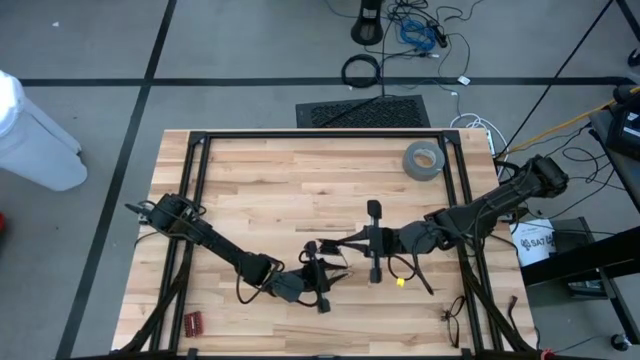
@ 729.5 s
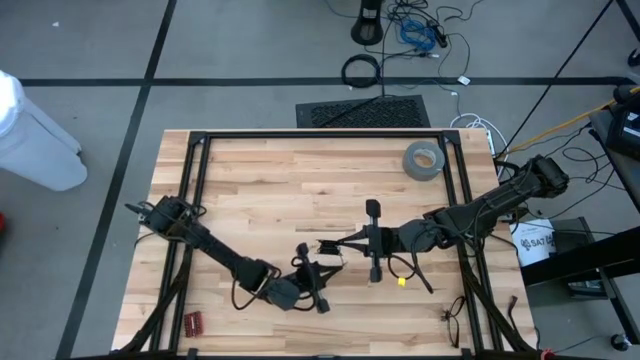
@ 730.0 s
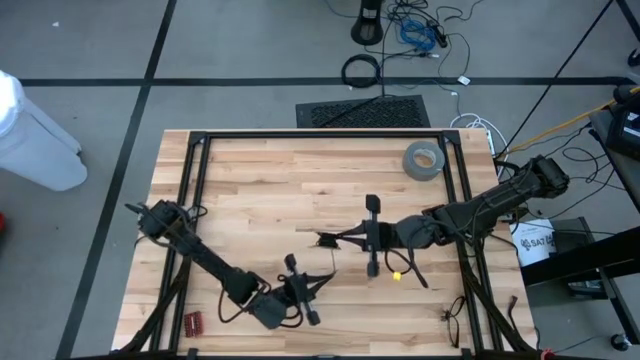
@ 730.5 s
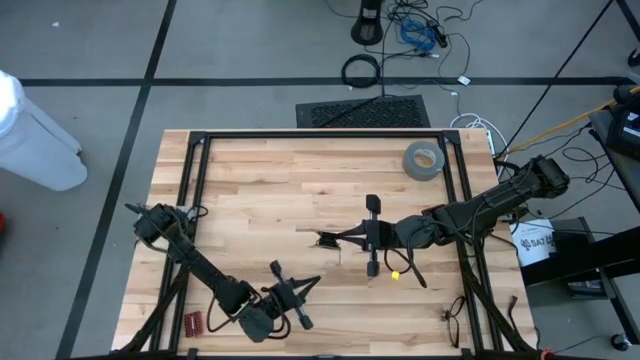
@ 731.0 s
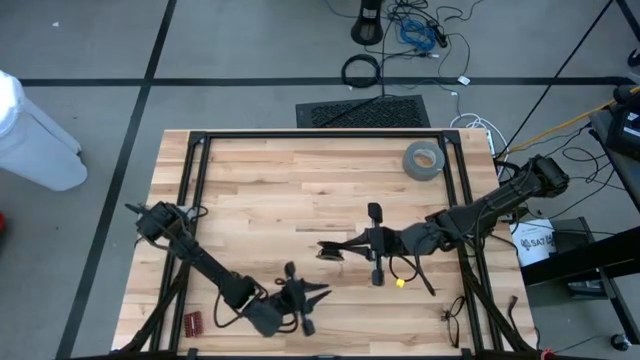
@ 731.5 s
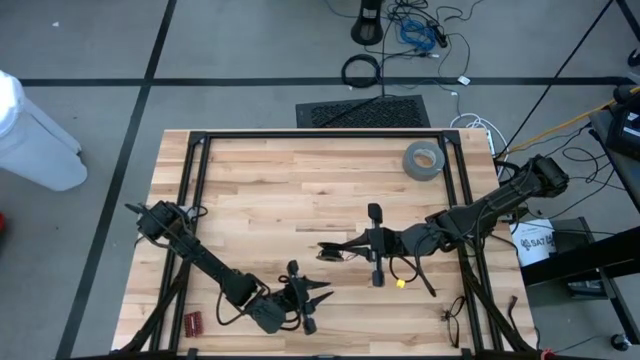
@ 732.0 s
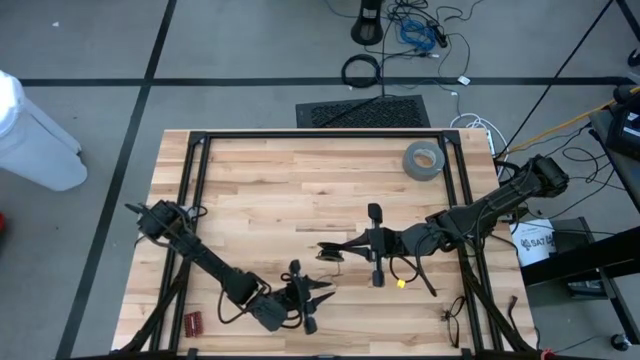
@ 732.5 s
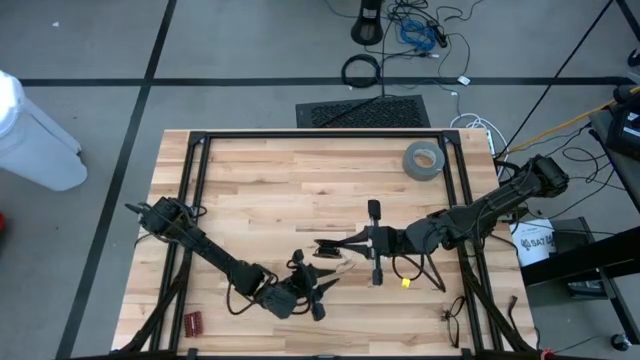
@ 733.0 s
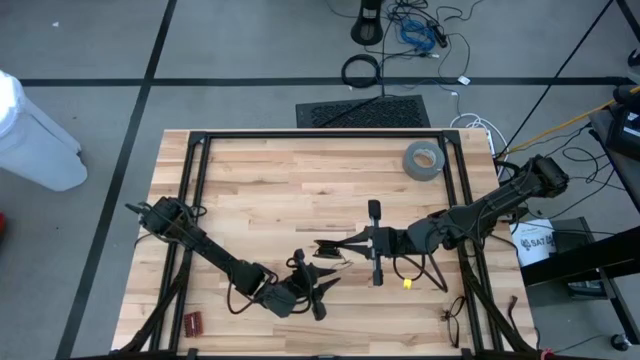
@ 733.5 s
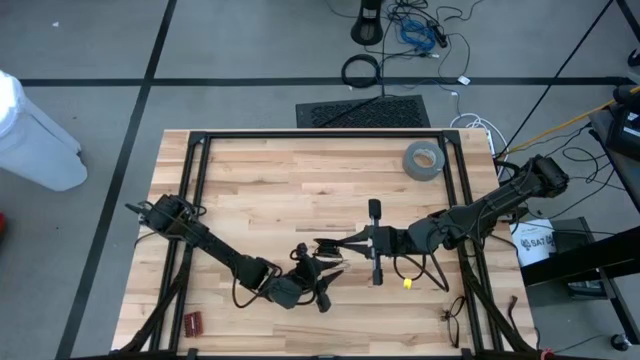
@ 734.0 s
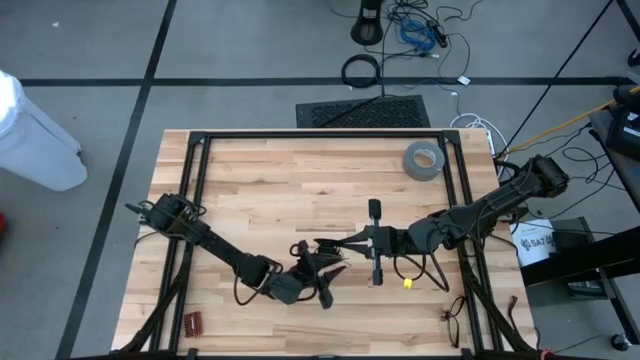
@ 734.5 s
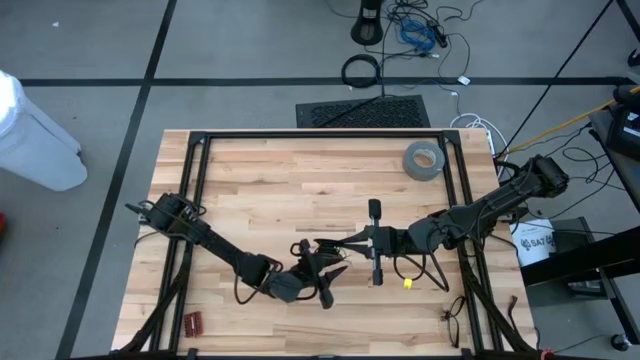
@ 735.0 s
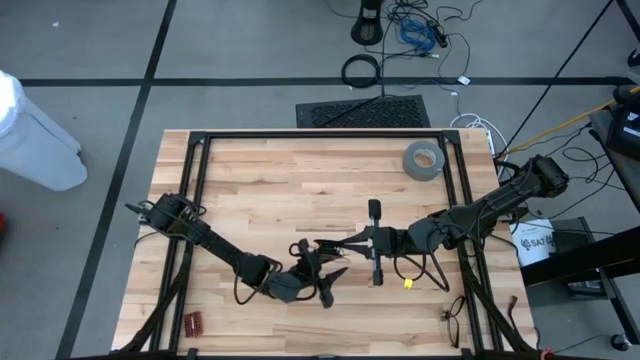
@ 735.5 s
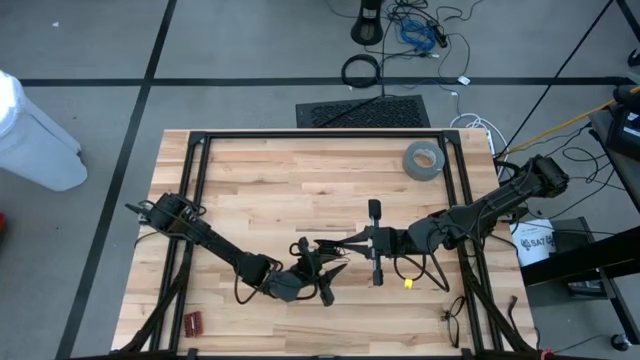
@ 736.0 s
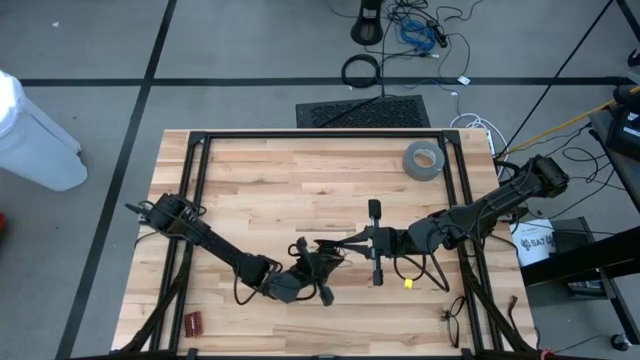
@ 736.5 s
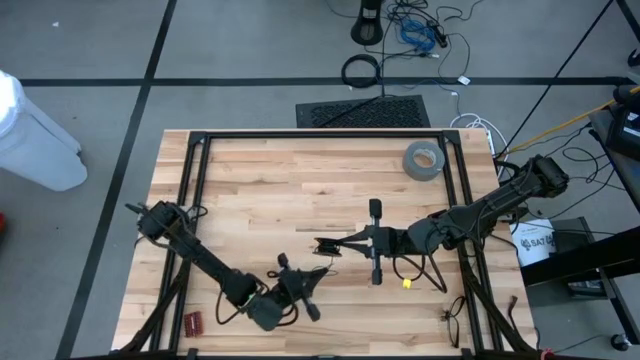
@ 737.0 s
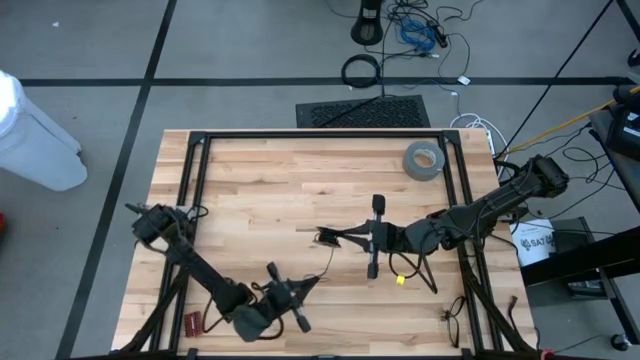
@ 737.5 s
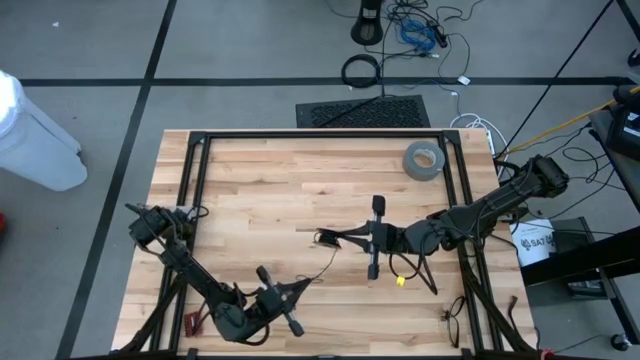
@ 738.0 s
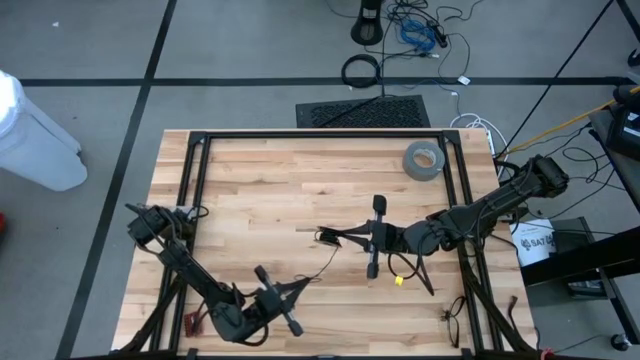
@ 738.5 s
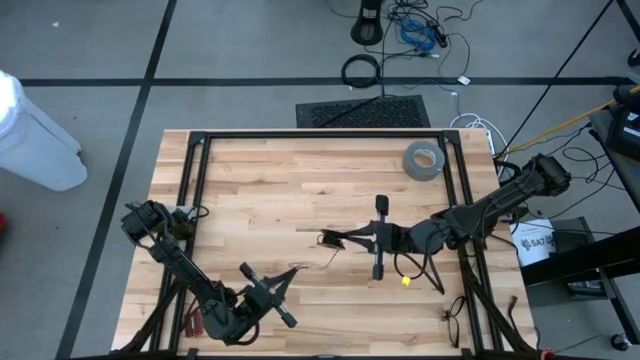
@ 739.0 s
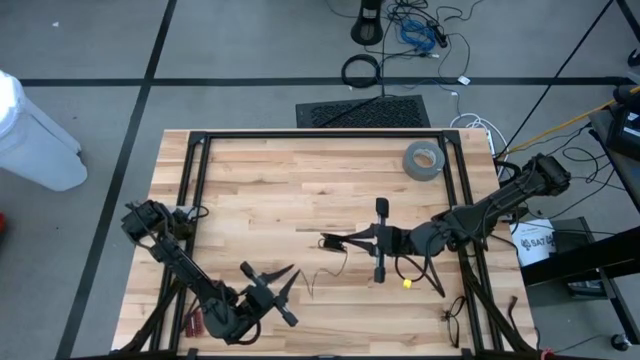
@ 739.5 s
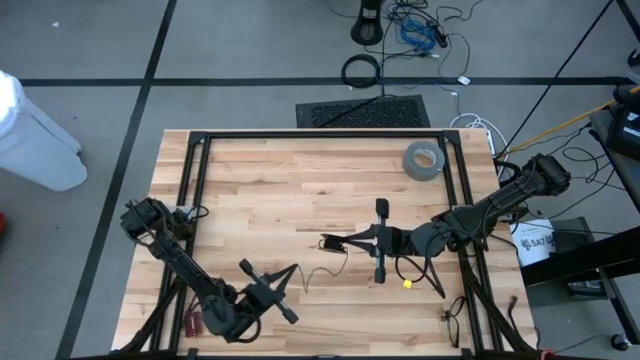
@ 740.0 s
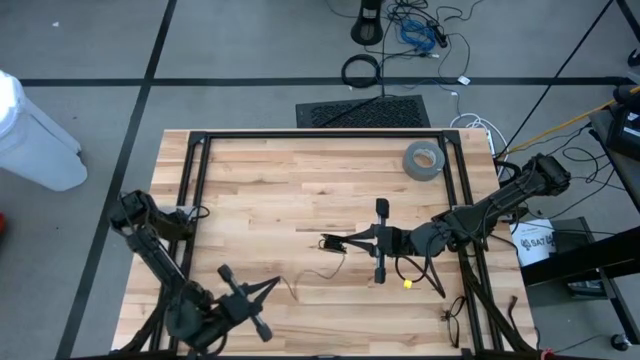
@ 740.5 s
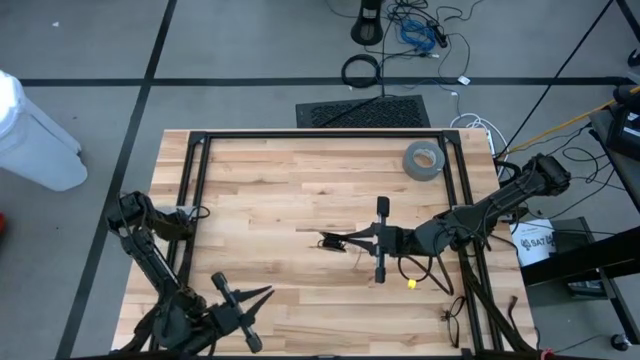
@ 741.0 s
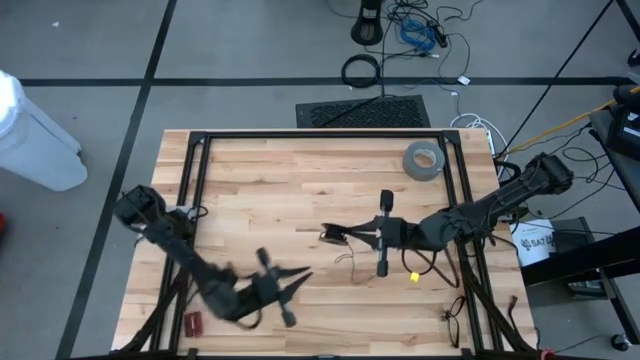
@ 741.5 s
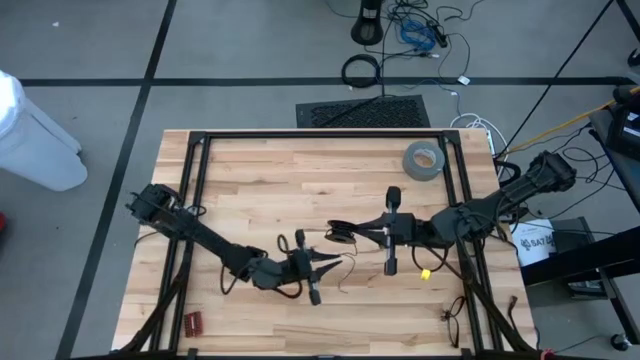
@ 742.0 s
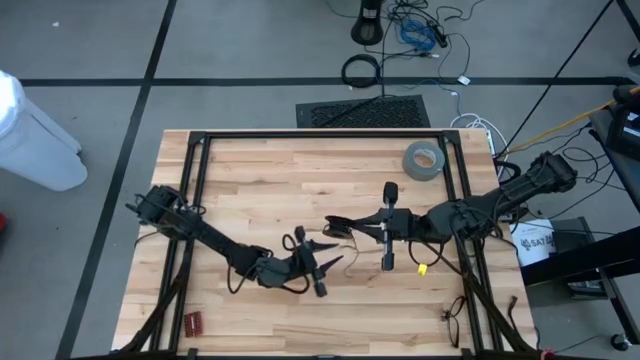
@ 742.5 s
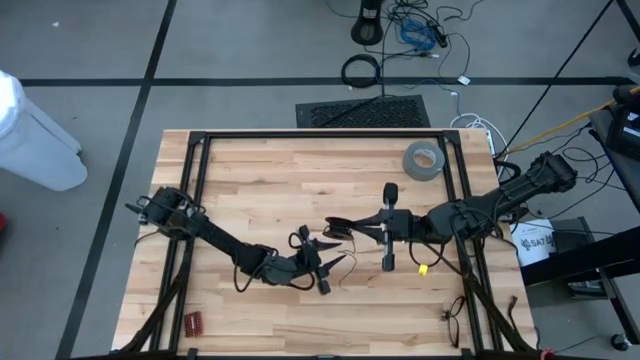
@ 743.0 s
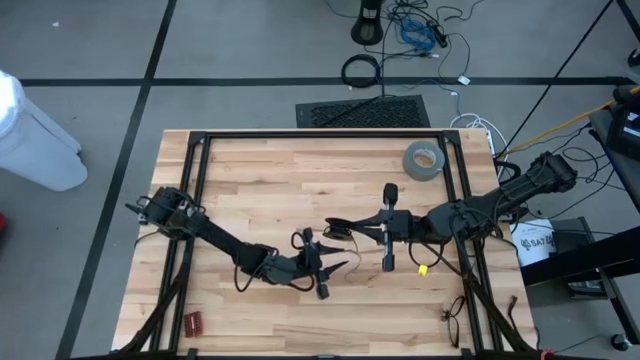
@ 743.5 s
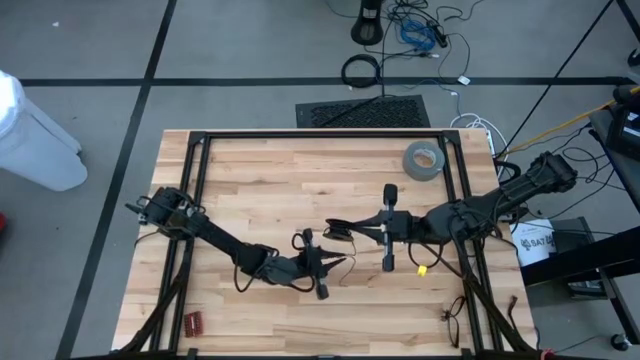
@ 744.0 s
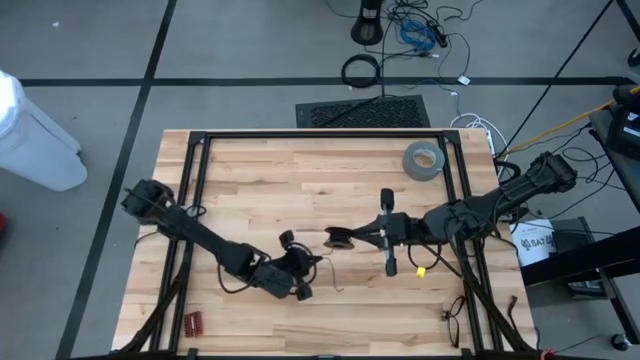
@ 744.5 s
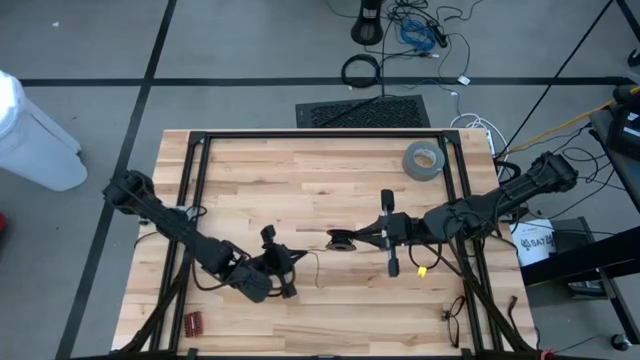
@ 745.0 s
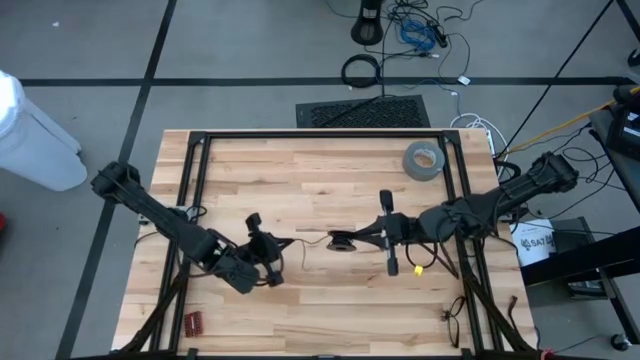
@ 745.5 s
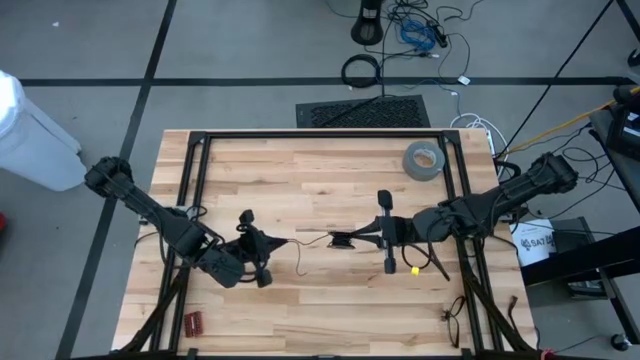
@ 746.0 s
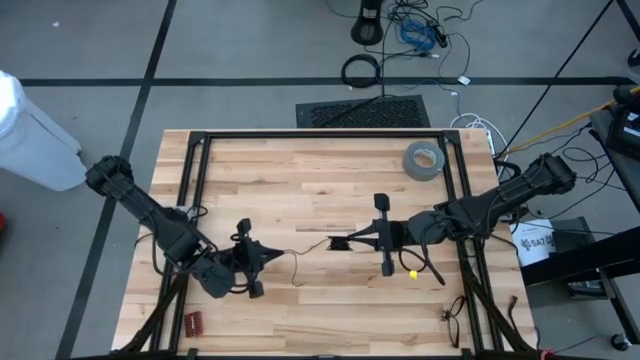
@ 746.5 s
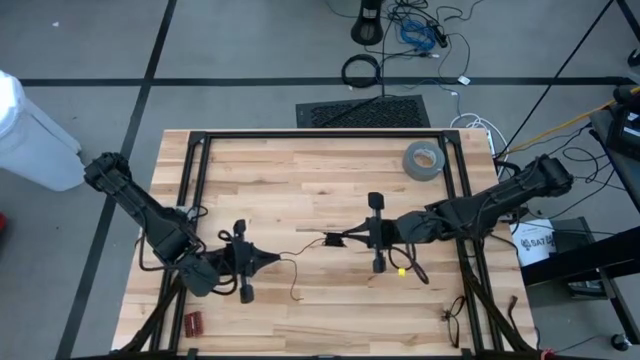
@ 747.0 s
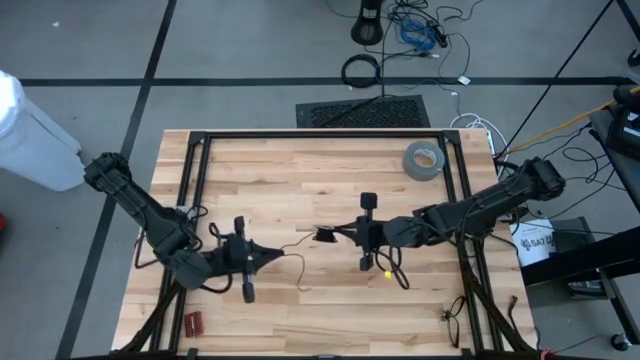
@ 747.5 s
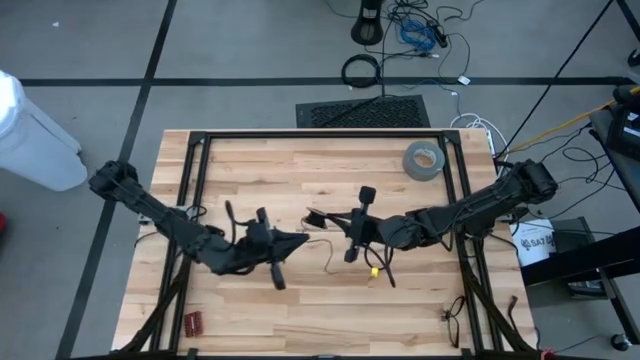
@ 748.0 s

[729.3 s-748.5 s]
Task: Coil cords
Coil the black wire onto the spool
